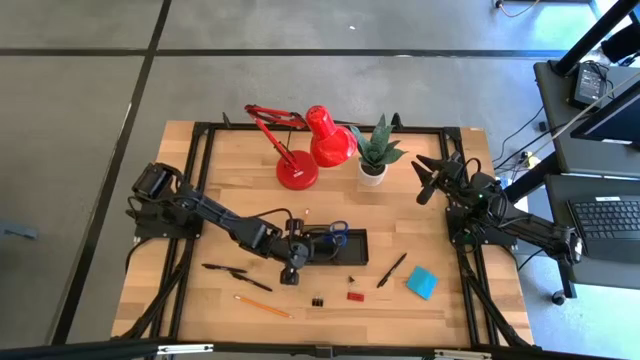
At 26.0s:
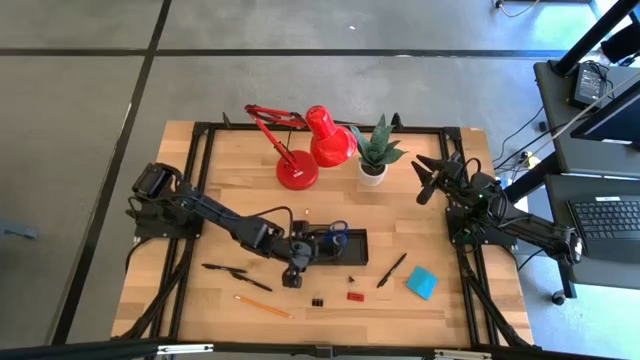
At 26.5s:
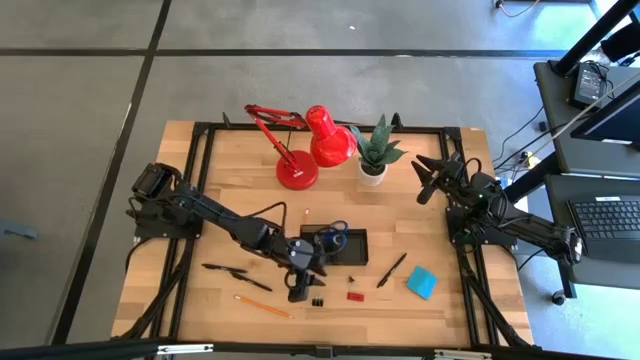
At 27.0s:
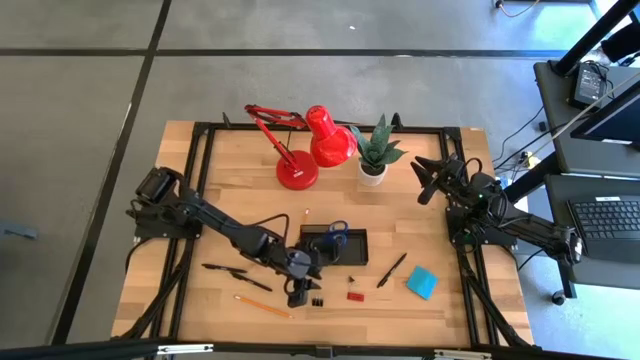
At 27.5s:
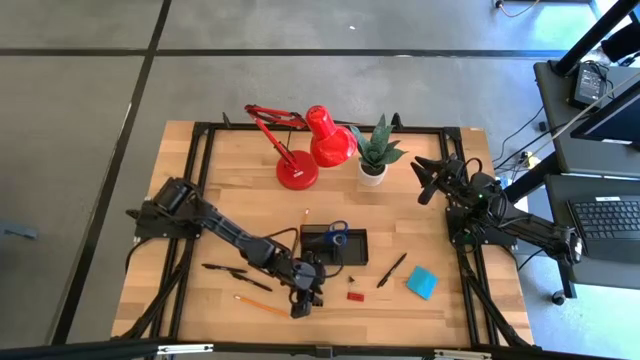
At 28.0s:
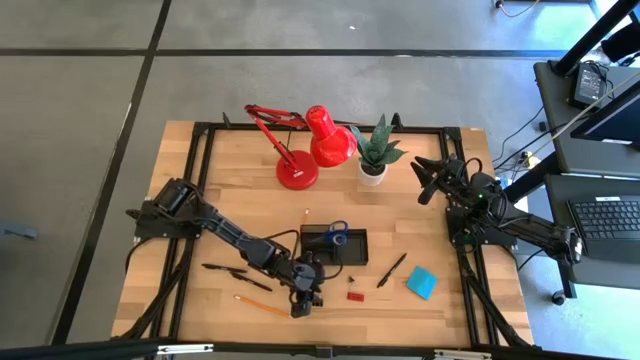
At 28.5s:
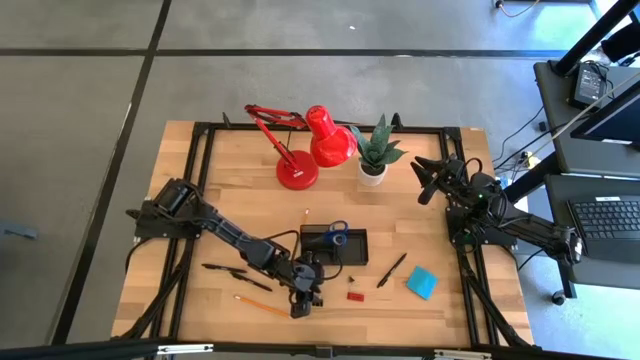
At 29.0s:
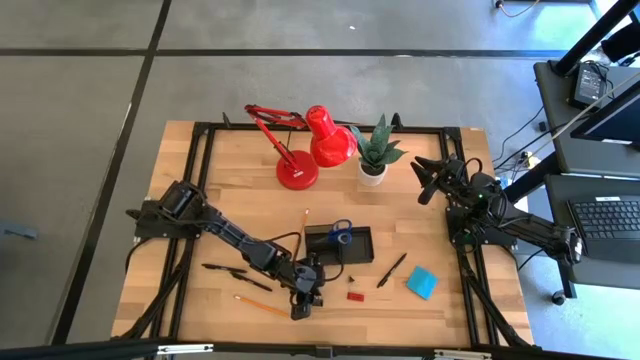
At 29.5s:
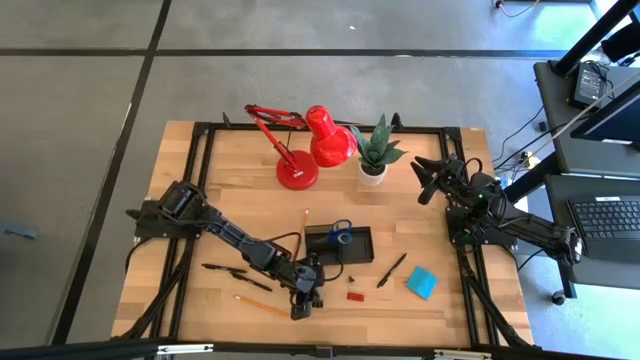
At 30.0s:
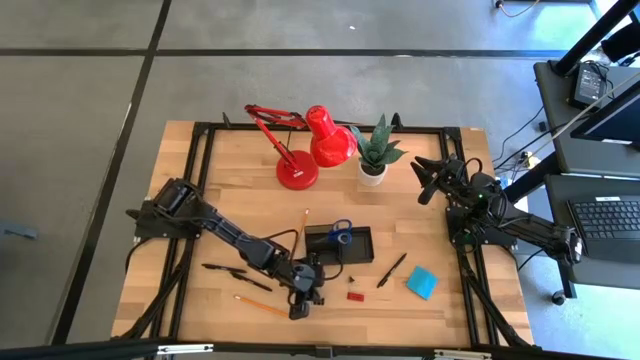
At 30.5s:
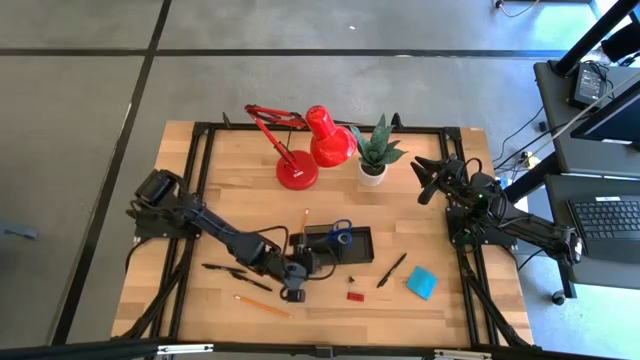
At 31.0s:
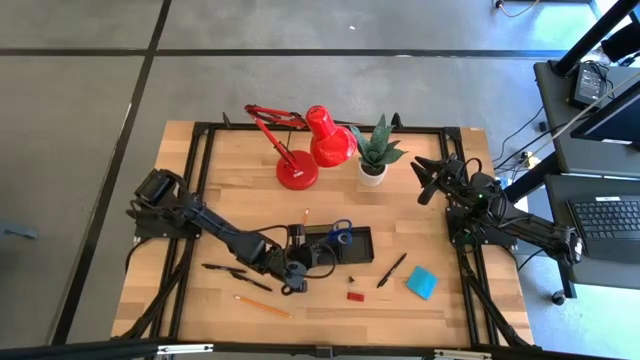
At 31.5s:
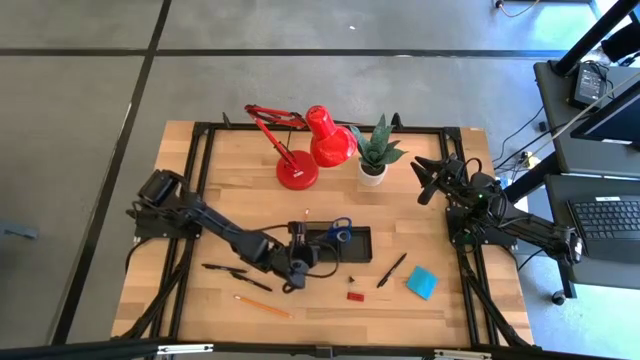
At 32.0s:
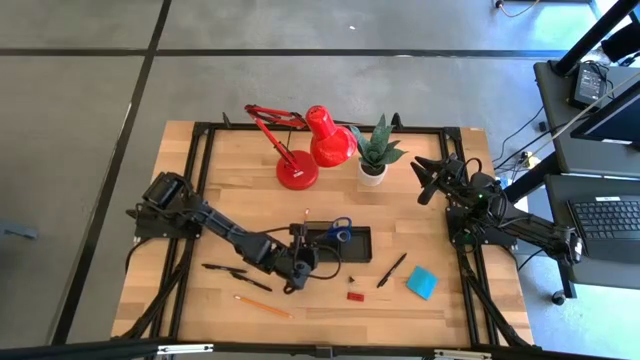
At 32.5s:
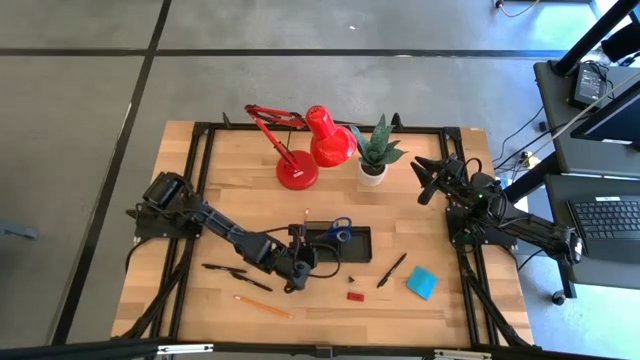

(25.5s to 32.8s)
Task: Pick and place office supplies into organizer
Put the left black binder clip into the black desk organizer

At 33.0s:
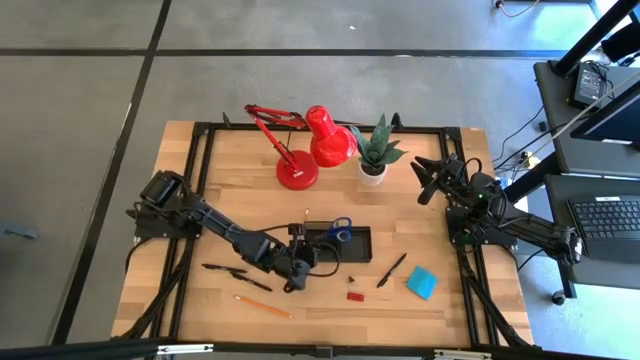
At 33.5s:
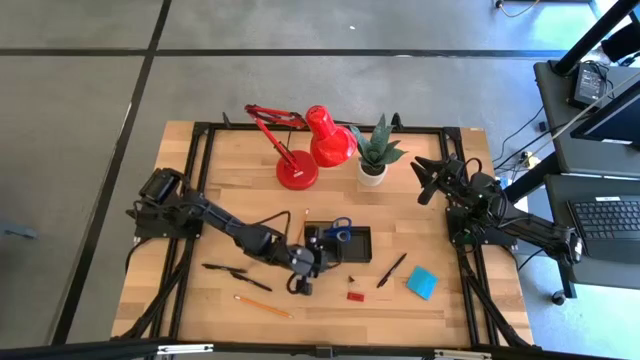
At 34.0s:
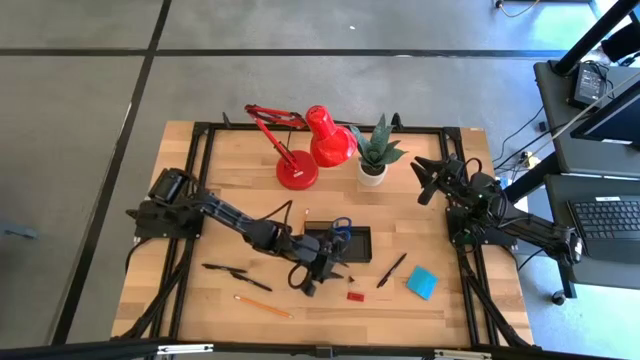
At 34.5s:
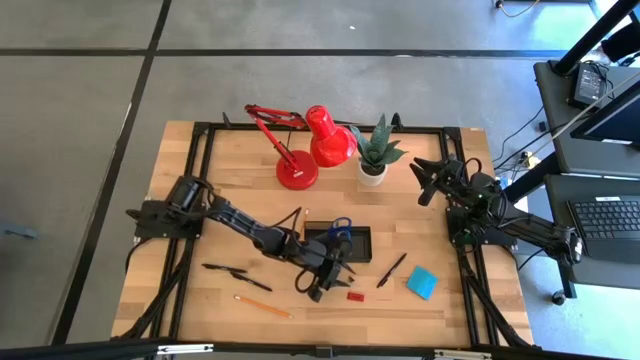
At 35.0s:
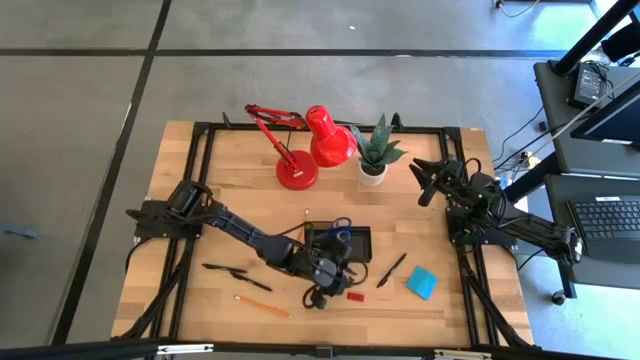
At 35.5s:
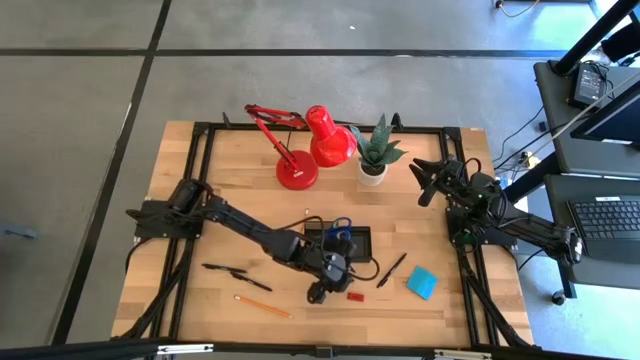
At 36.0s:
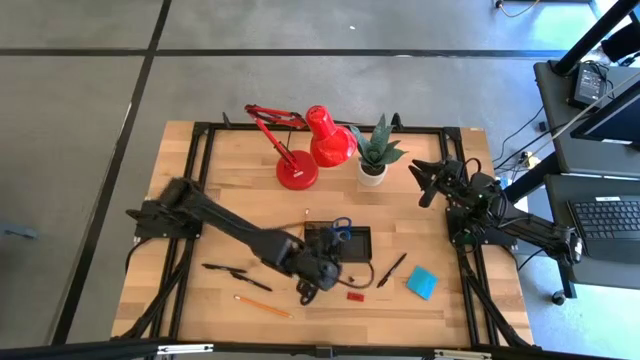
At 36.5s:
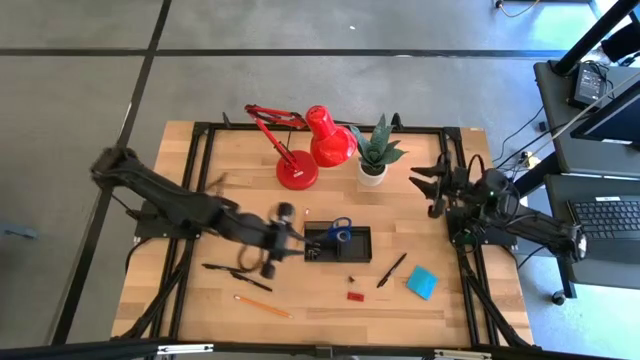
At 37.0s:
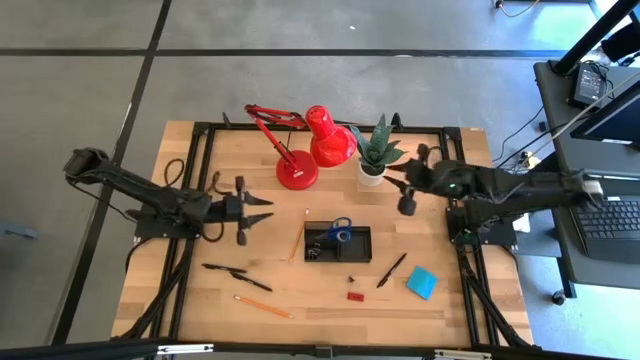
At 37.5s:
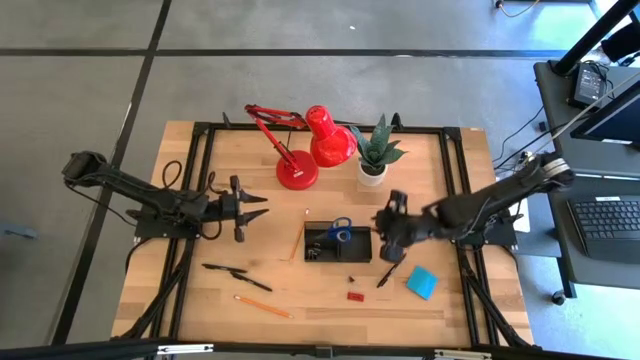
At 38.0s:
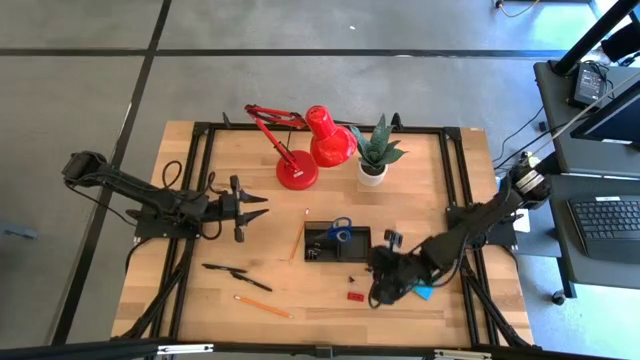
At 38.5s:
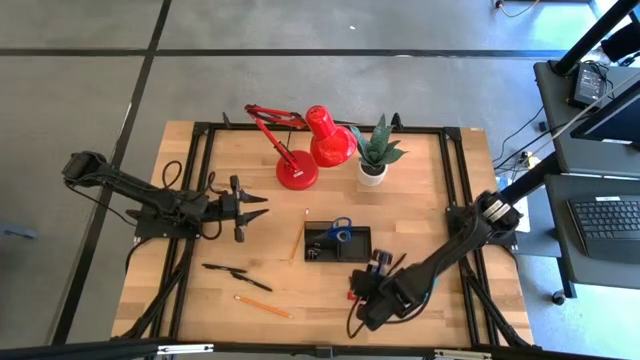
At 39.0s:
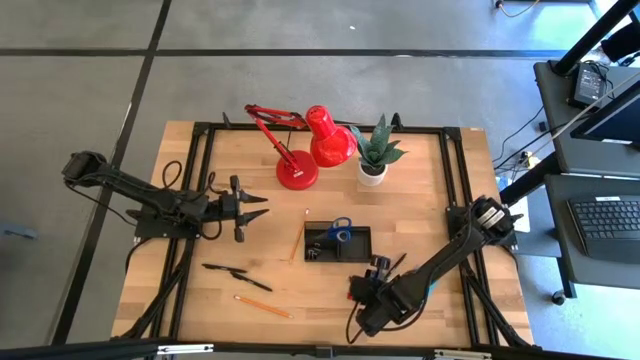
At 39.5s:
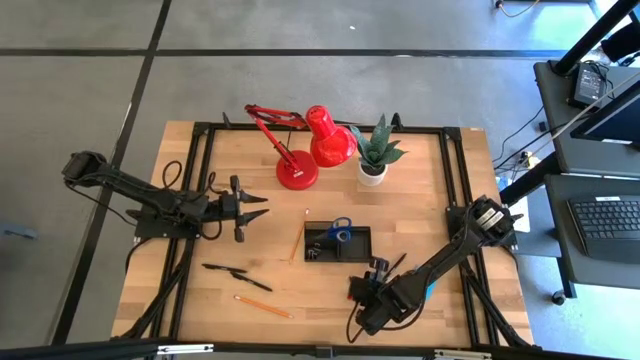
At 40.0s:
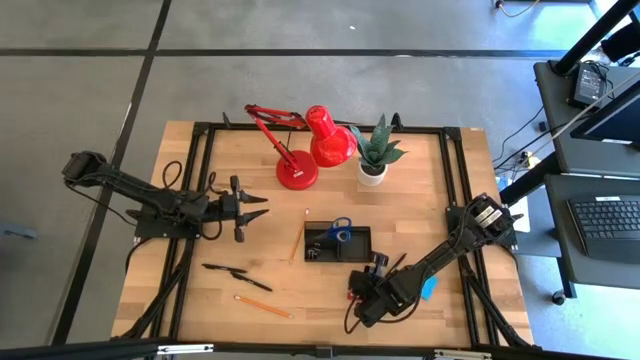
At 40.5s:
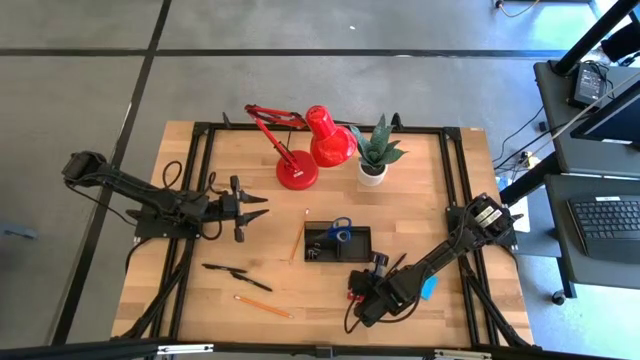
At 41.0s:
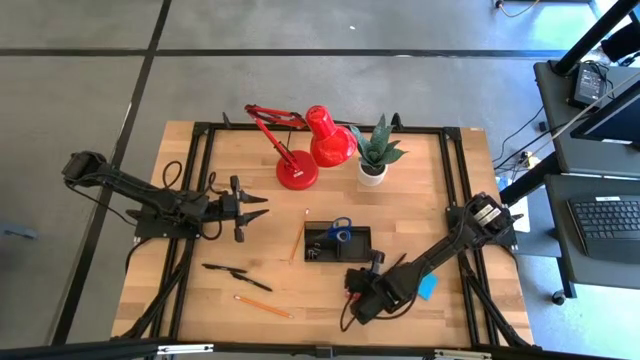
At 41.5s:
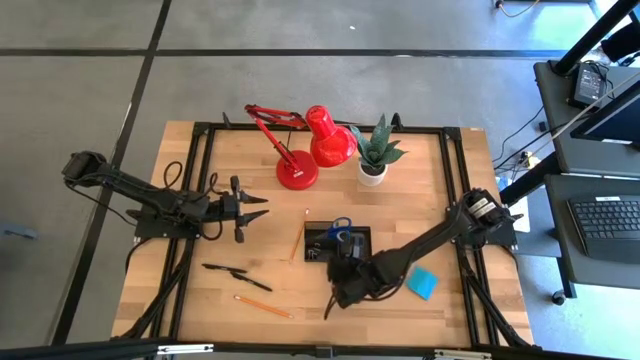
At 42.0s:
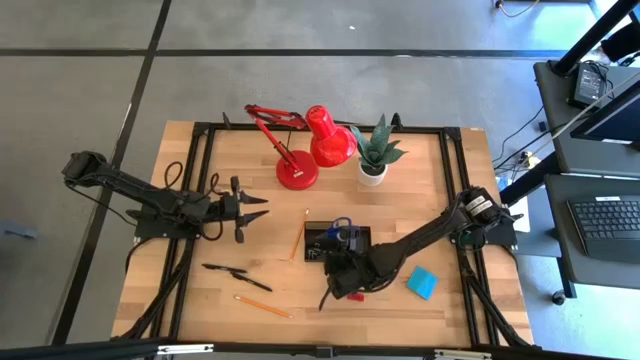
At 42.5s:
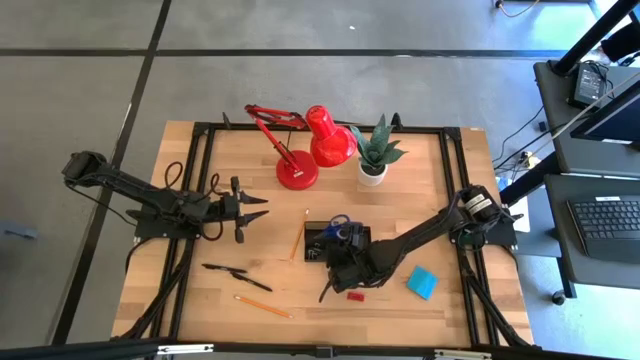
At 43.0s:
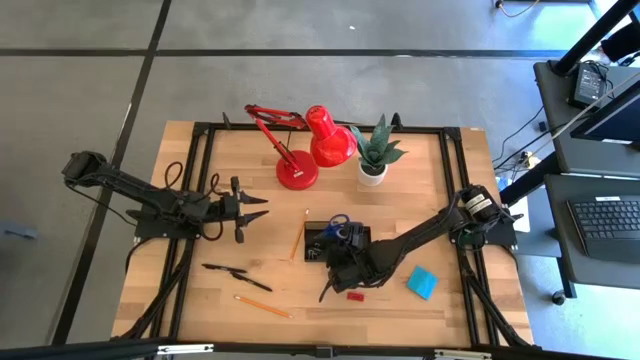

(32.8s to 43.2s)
Put the black binder clip into the black desk organizer

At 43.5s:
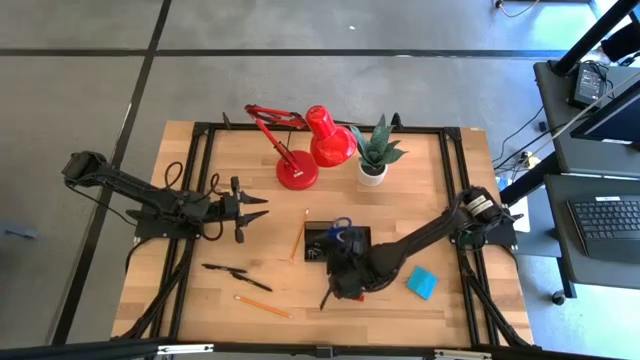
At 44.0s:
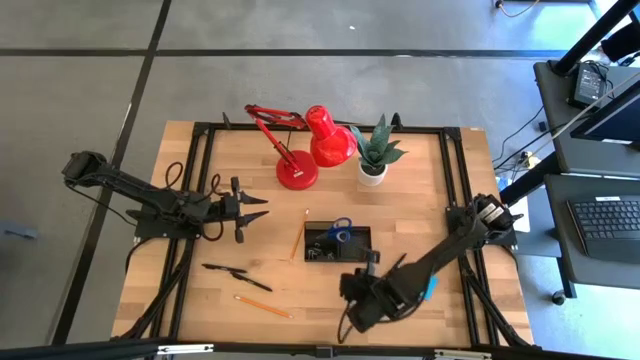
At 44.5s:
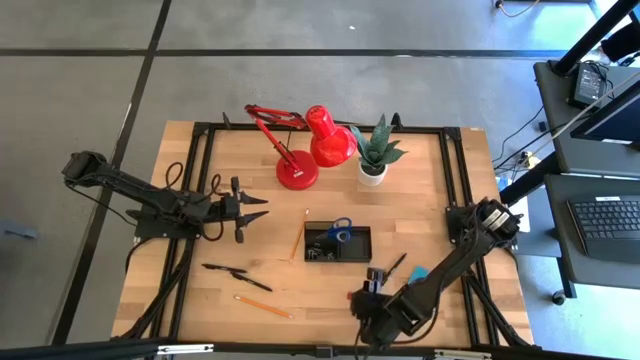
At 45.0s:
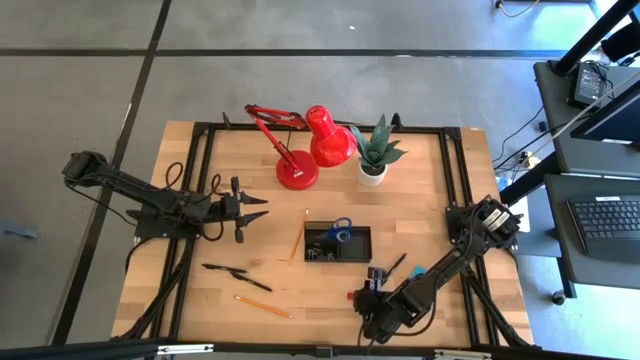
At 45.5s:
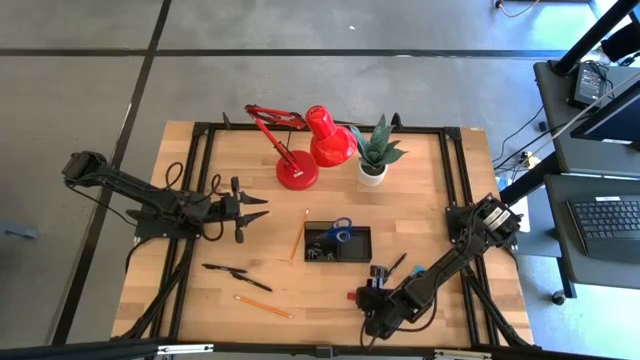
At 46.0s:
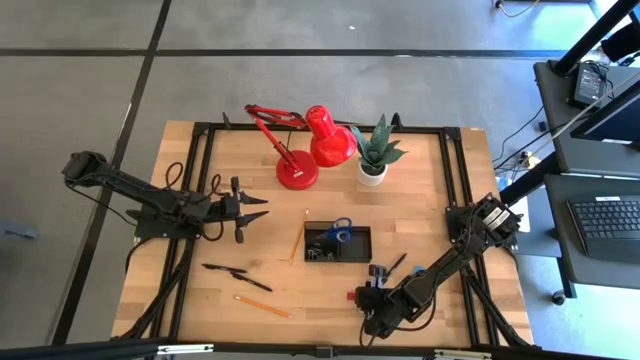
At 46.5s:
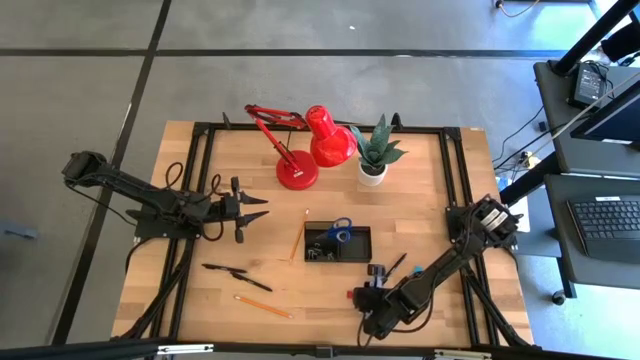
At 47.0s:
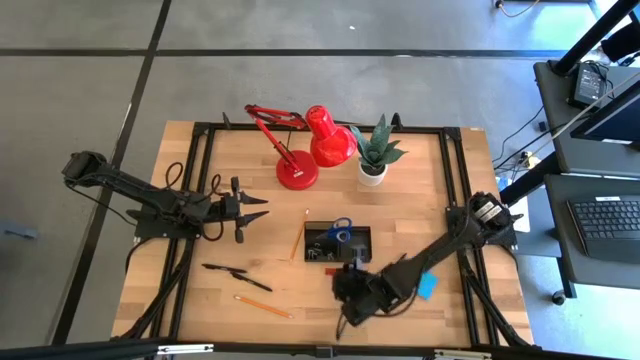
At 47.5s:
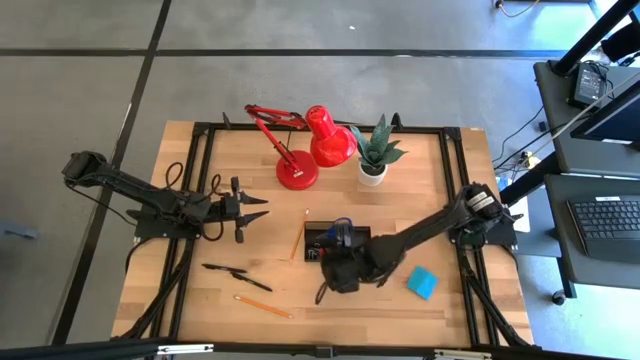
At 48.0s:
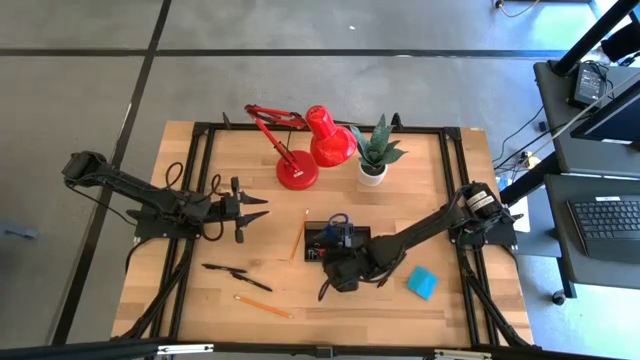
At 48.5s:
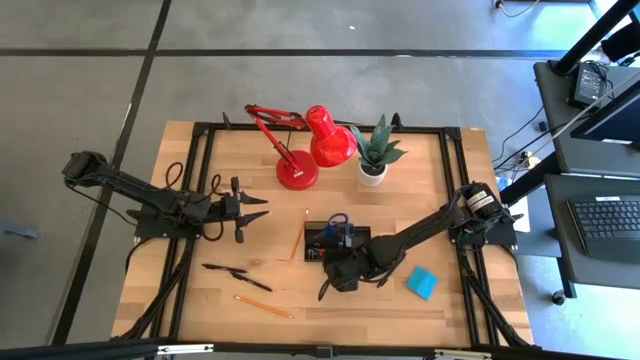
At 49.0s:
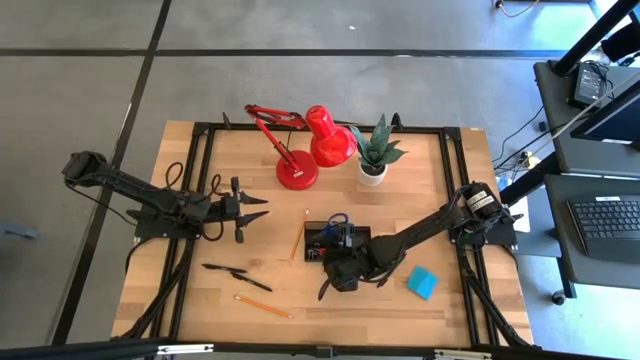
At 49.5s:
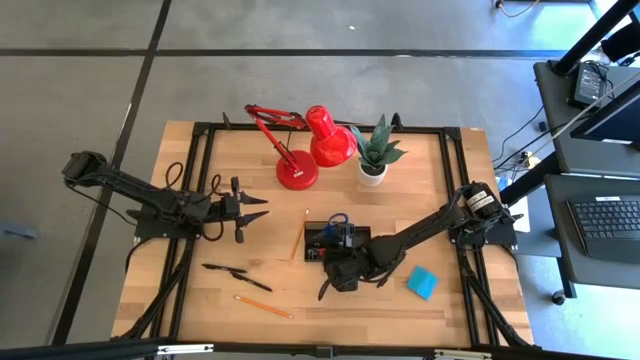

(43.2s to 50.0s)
Put the red eraser into the black desk organizer
